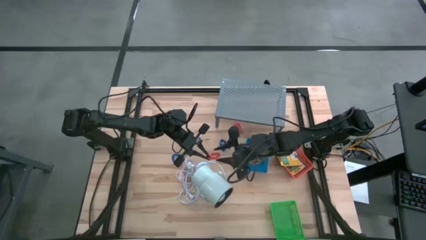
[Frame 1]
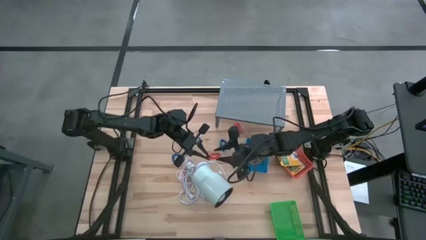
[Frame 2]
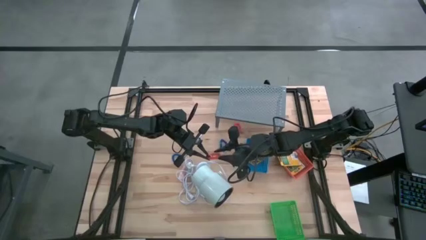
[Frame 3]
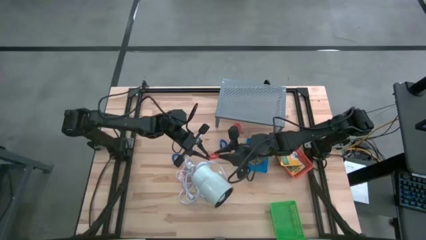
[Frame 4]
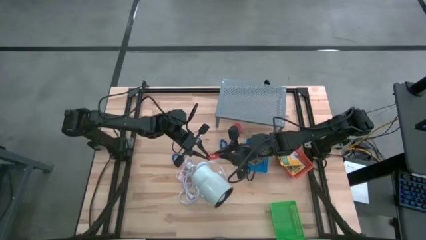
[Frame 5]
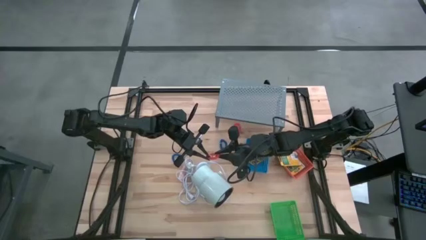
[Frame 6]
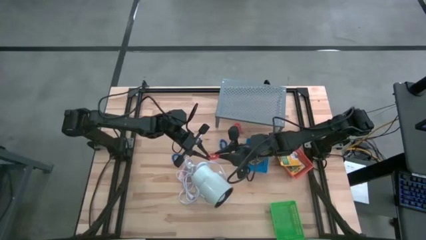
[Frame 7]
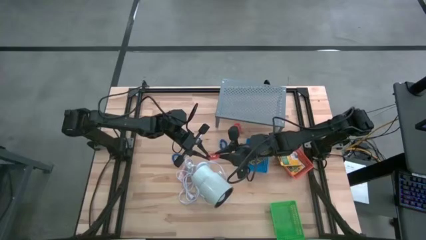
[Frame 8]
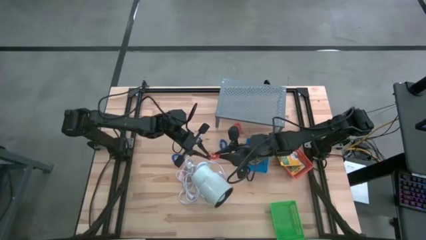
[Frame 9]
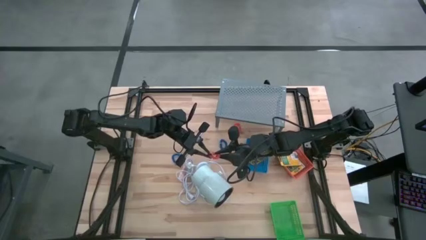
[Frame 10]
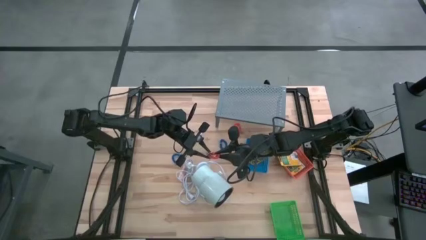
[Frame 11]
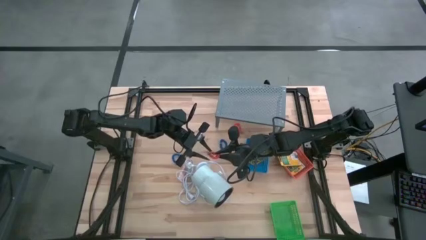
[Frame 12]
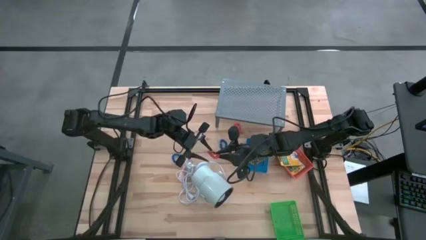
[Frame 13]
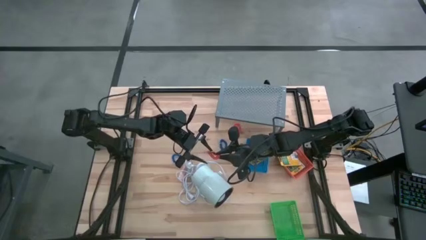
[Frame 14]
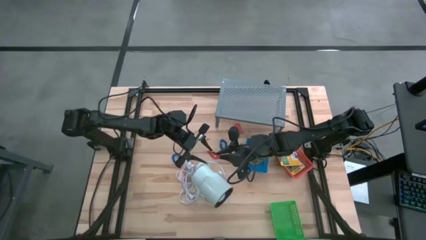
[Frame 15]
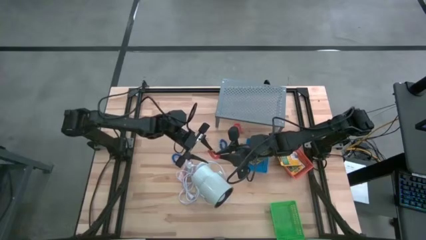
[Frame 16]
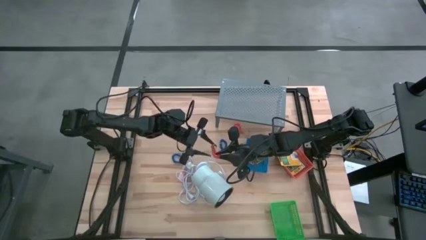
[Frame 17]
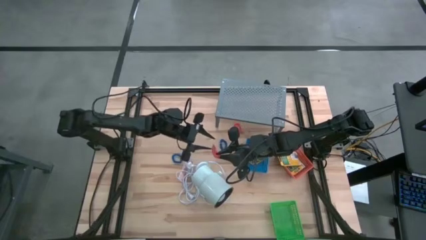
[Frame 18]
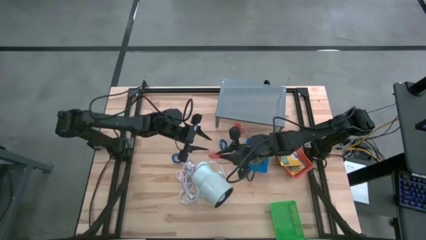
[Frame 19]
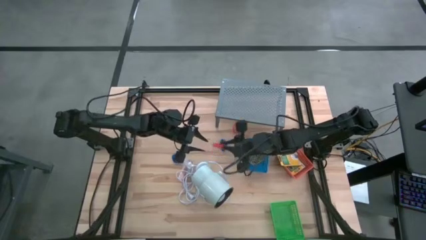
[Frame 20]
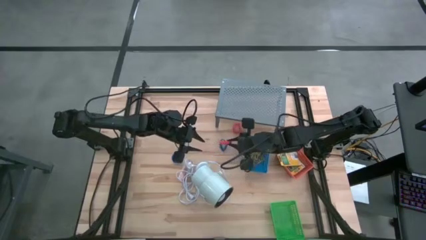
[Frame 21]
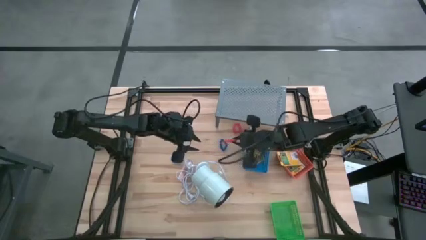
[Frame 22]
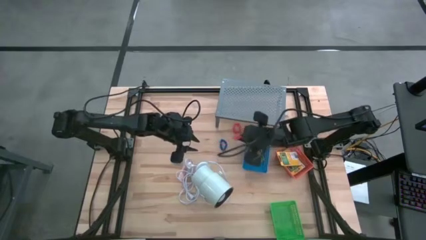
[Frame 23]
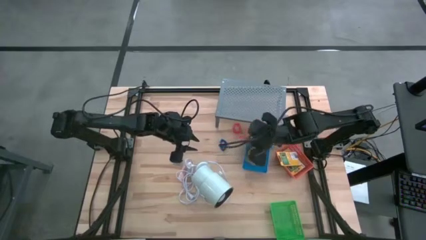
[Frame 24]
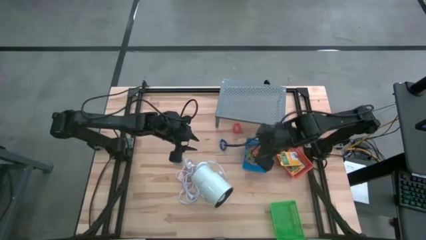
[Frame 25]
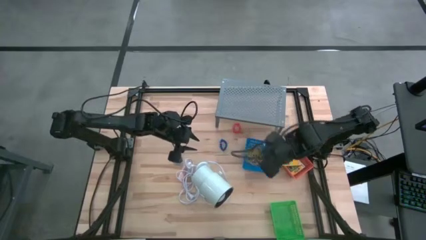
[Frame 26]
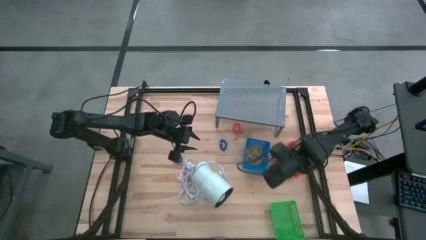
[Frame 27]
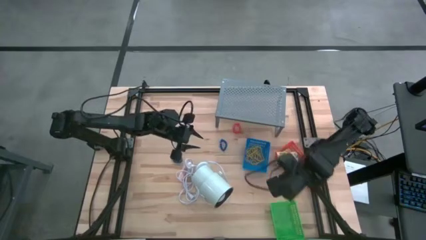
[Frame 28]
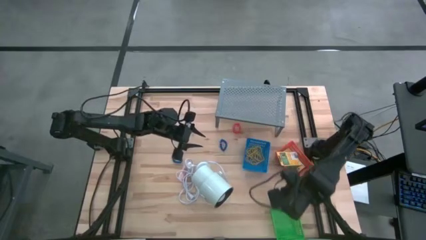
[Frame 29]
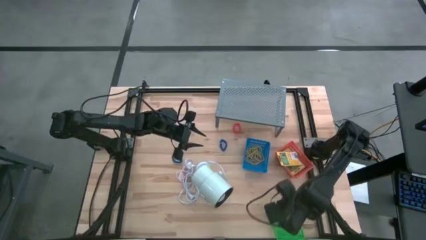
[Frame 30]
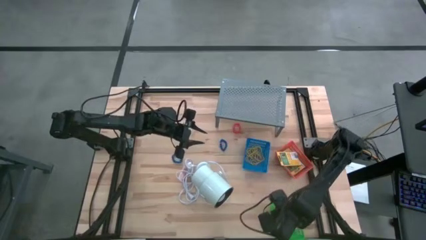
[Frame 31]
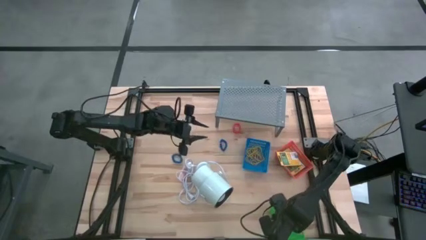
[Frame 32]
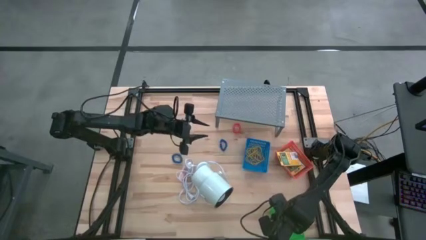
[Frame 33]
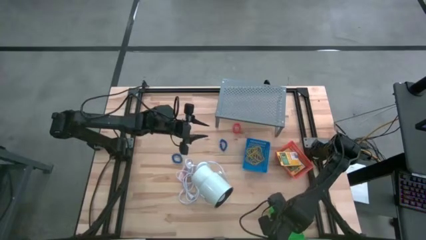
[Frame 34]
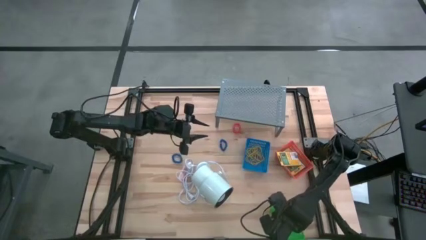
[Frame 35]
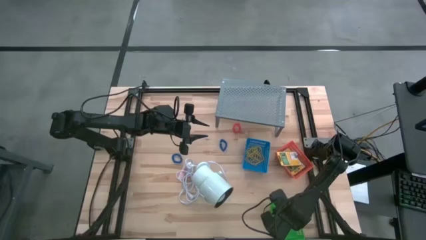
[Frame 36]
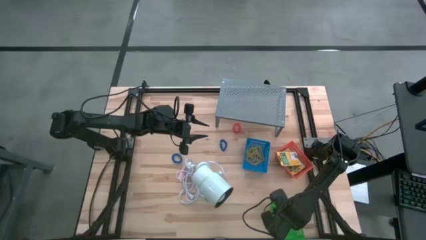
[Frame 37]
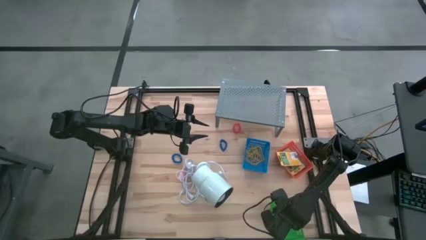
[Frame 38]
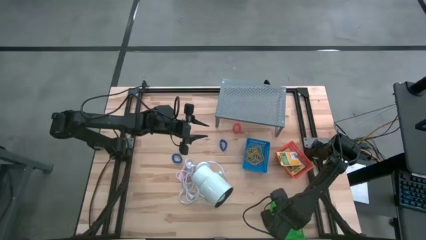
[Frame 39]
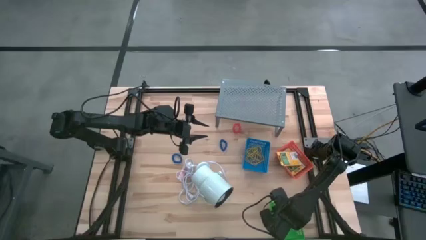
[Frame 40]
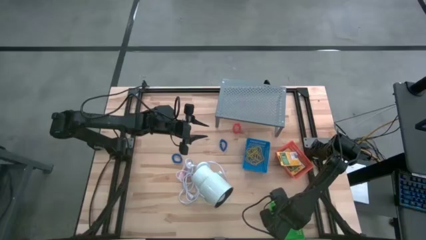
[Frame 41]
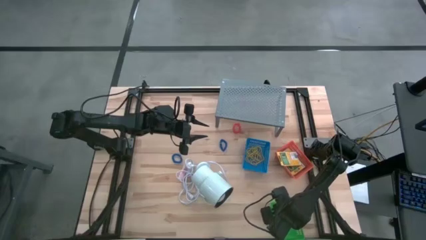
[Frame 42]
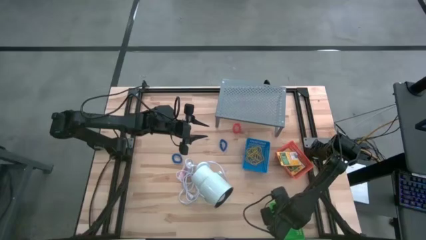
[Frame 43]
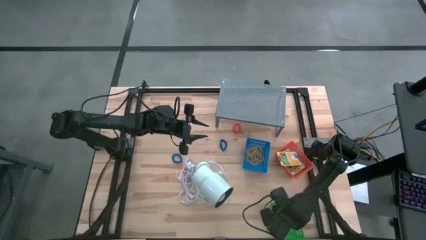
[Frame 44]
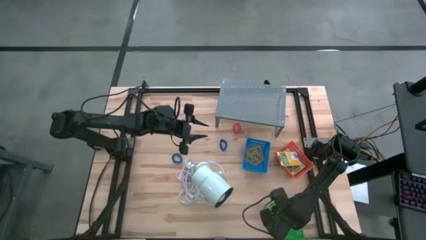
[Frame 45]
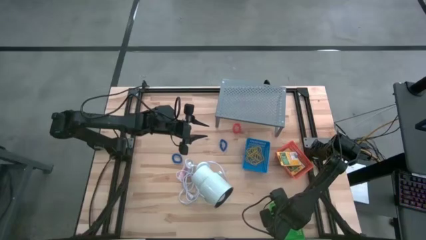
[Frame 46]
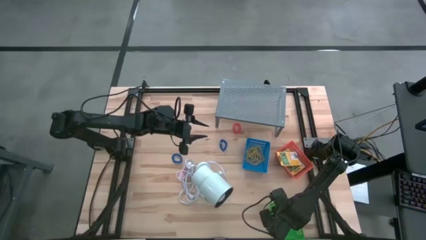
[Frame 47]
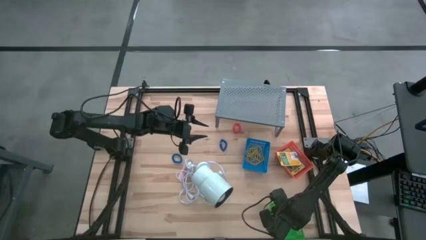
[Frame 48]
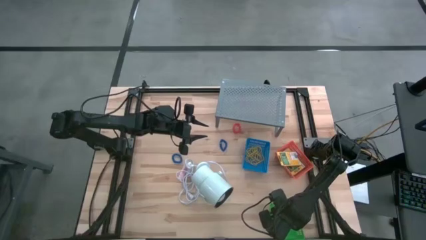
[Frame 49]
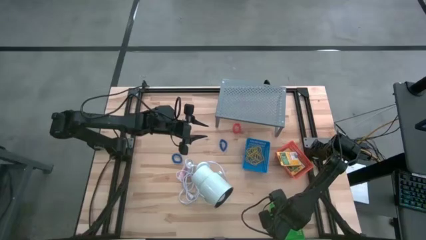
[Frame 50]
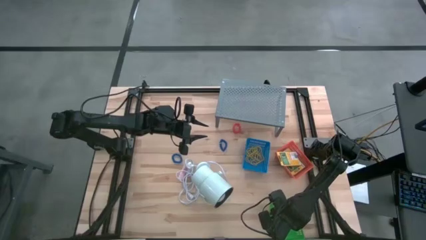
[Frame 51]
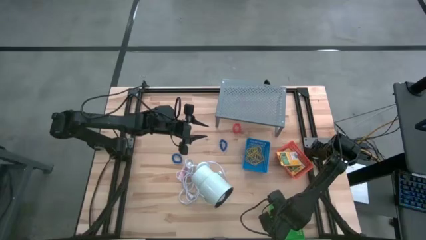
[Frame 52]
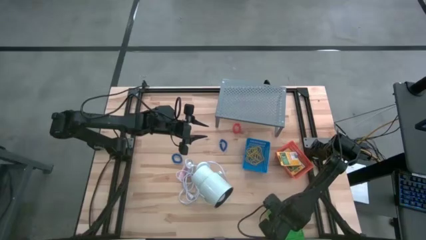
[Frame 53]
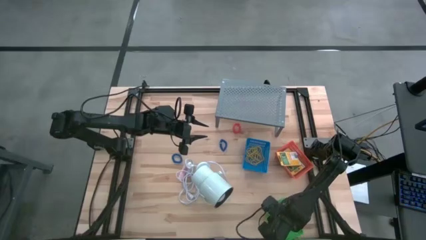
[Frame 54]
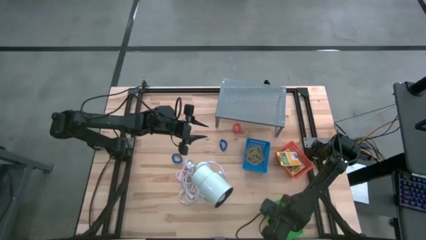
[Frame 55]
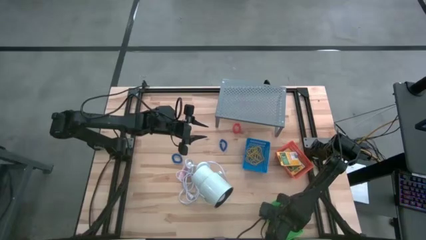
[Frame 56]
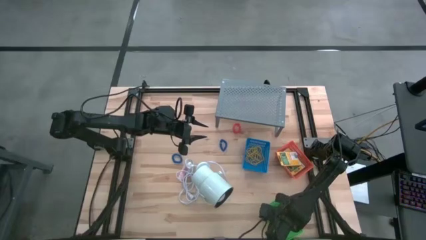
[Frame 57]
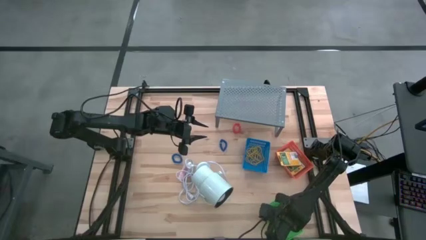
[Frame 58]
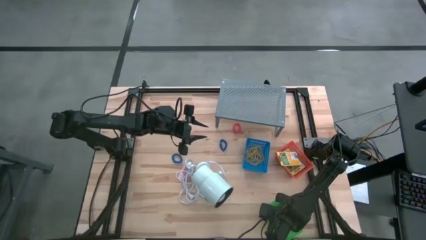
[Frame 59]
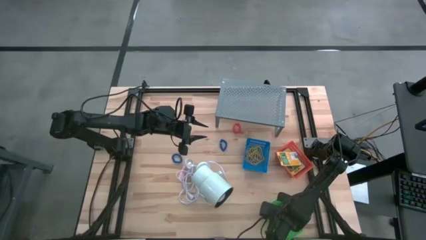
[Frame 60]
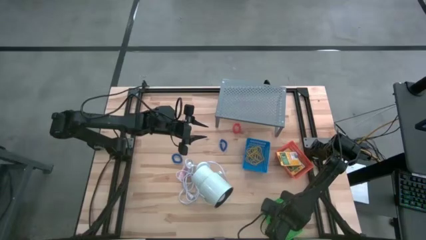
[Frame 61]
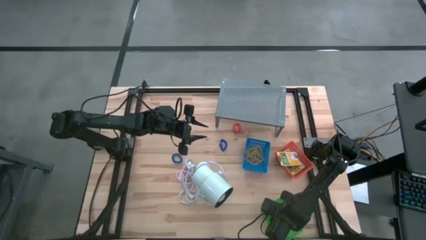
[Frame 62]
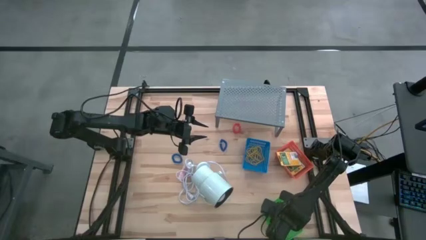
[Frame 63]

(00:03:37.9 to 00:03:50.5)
Task: Pick & Place Office Desk Supplies
Put the orange spring keychain into the green bin
